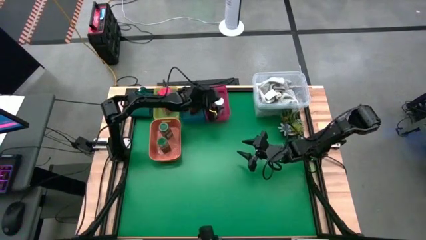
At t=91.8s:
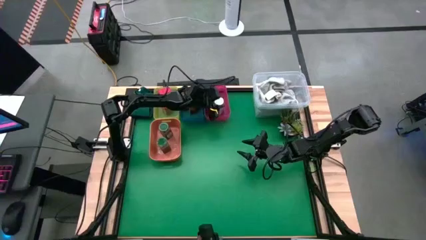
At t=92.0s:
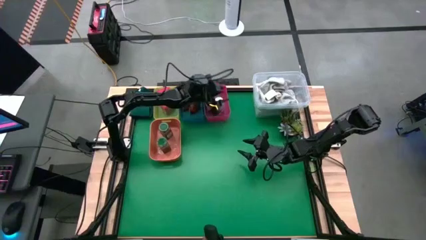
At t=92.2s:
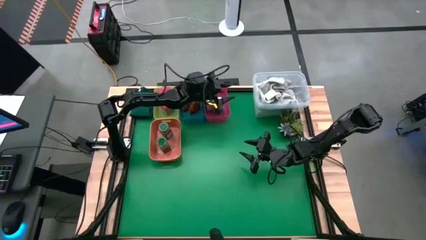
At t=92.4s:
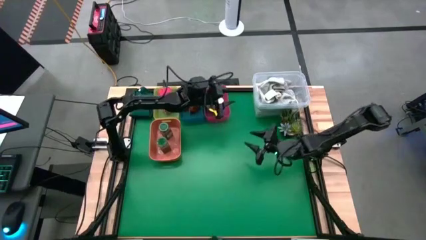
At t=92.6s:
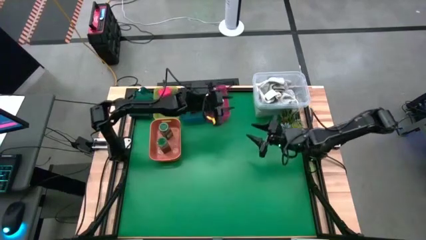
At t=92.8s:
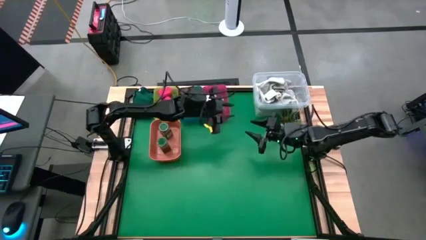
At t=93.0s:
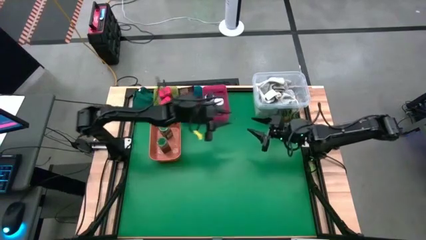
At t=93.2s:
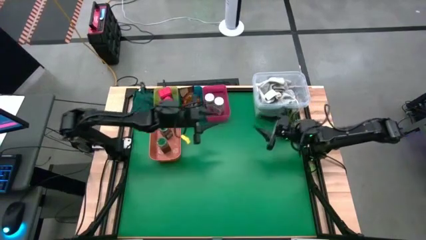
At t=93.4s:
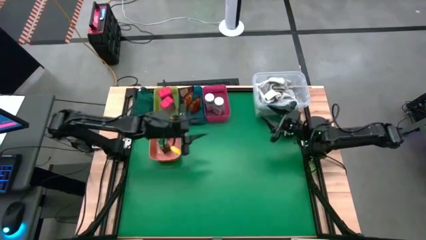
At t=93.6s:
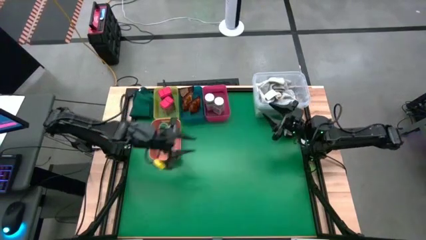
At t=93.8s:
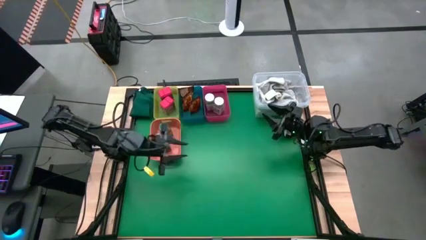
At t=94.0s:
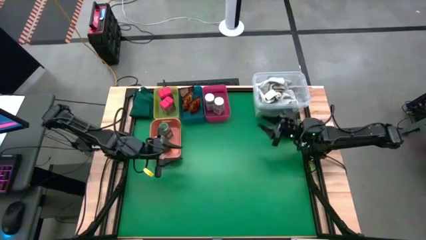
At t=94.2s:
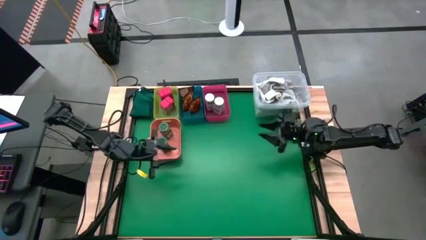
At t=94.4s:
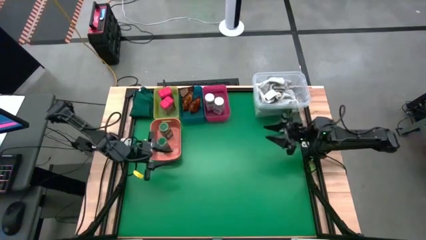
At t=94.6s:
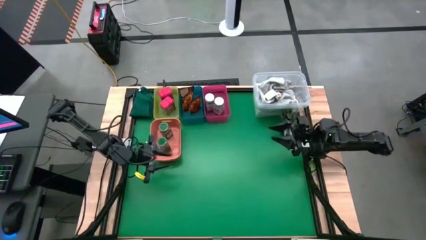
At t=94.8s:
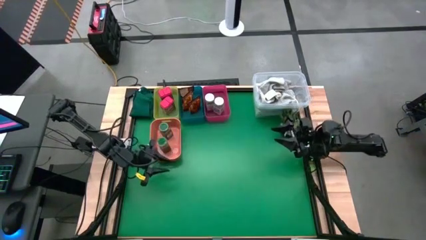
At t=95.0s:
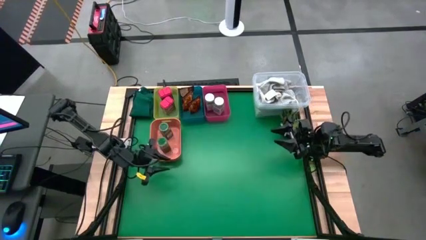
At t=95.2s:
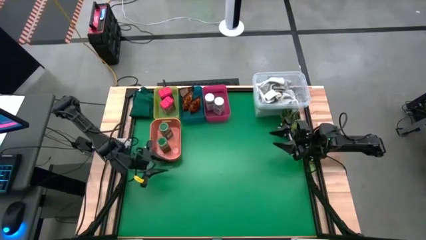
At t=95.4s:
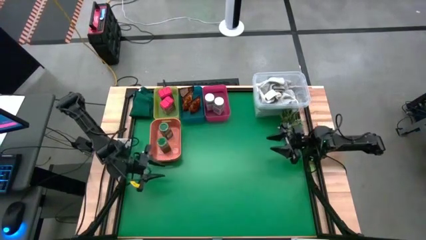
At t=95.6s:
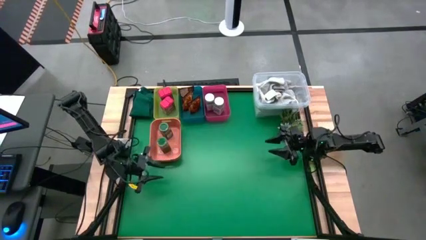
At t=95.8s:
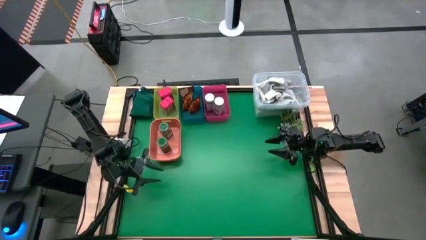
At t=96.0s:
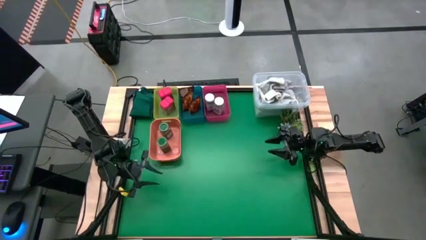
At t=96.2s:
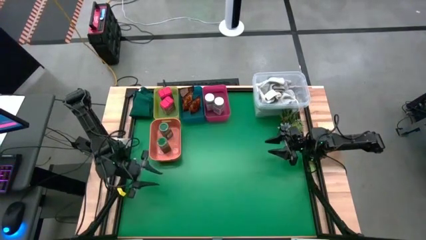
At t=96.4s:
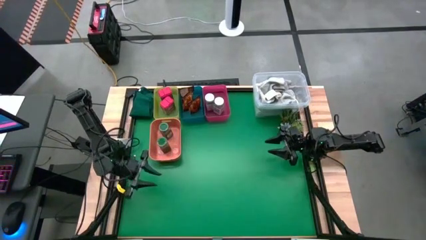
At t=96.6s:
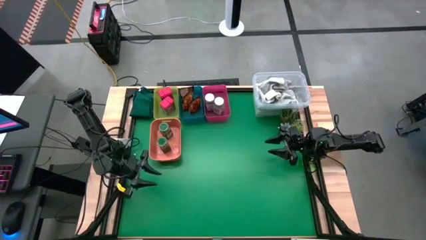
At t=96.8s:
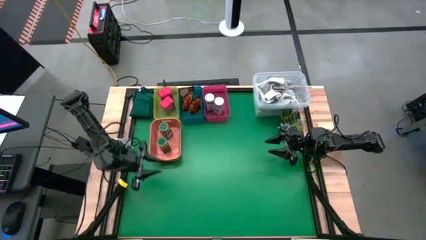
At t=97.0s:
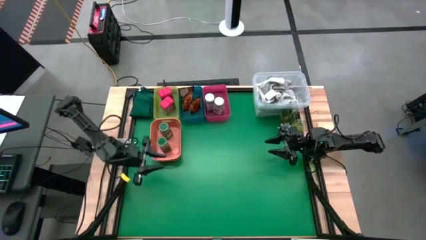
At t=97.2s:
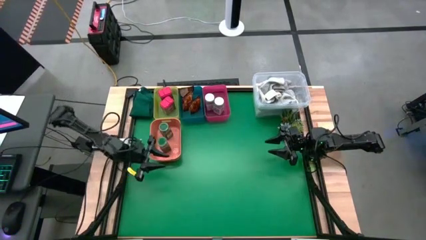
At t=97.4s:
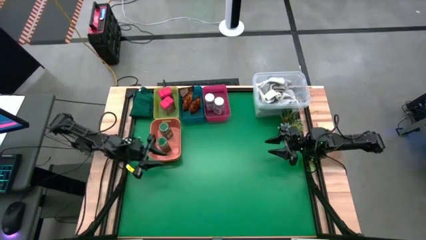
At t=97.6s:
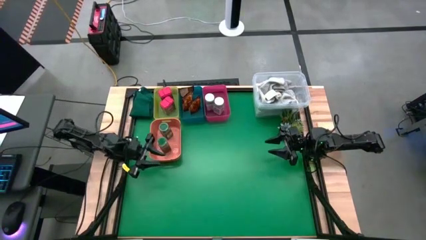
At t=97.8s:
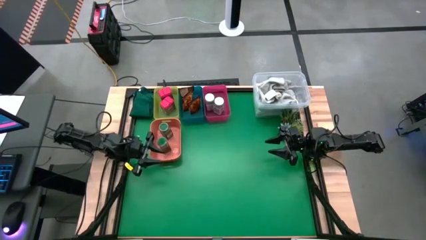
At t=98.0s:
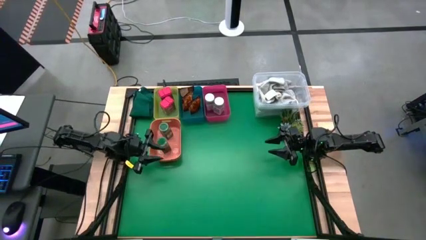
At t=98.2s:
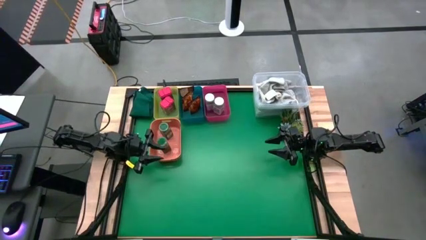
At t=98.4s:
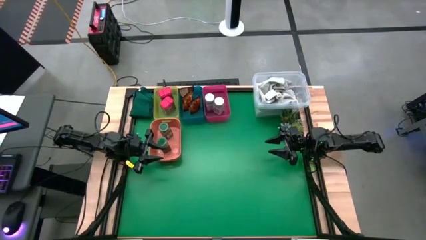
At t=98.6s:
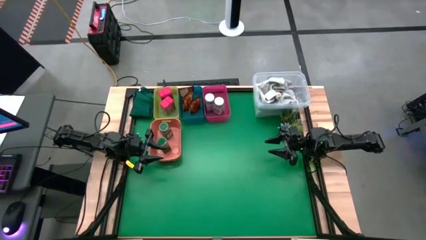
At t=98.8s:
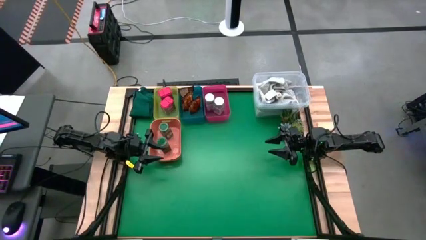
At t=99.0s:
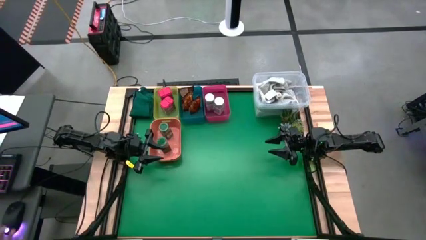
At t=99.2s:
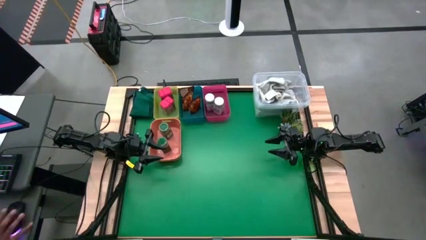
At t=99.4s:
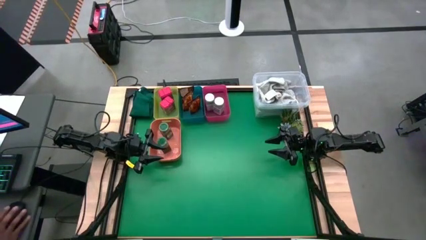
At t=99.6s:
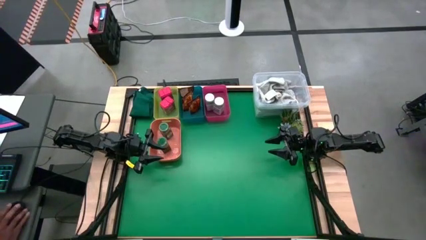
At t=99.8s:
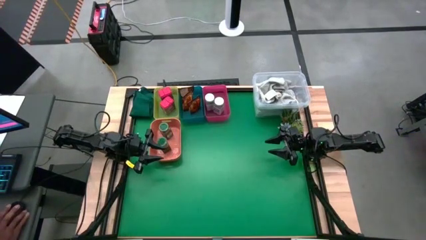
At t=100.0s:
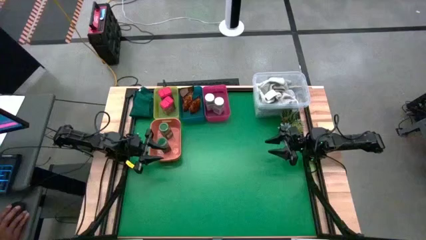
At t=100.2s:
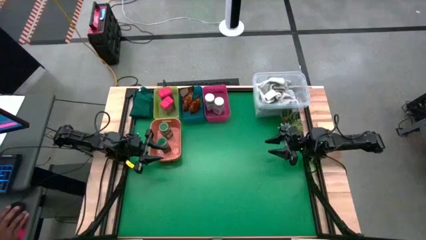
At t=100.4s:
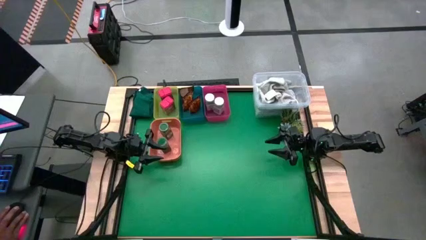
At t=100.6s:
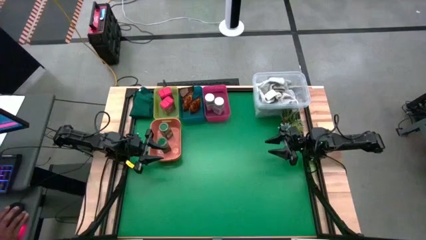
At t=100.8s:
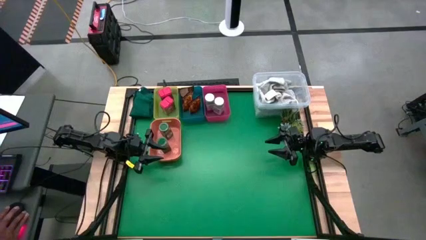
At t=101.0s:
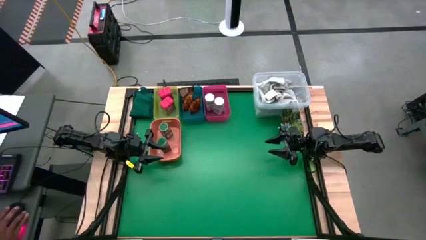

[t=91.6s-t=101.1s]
Task: Sort spices by type
Return to Home Position
